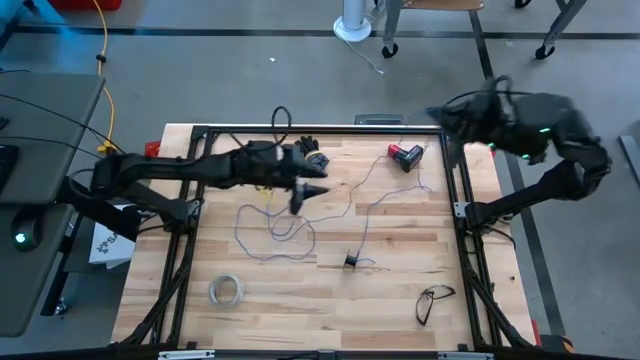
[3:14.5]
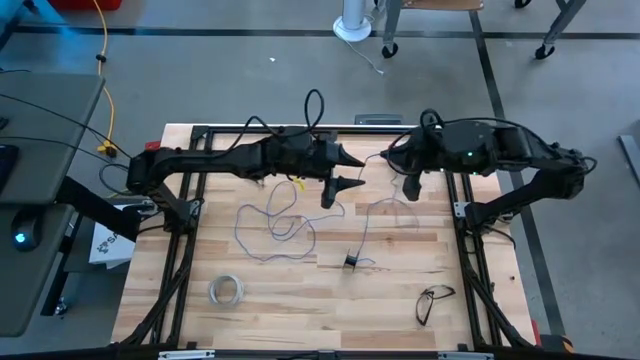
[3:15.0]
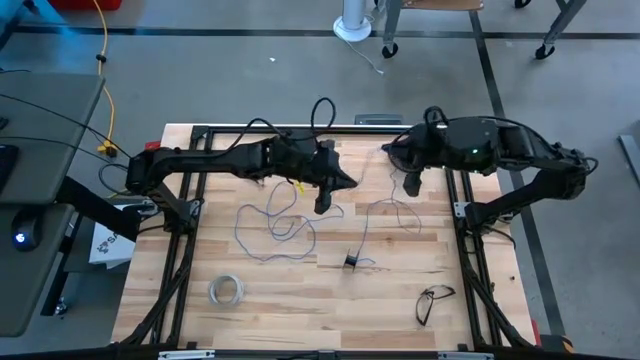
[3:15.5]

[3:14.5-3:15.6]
Task: Coil cords
Uncoil the blue wire from the black spool

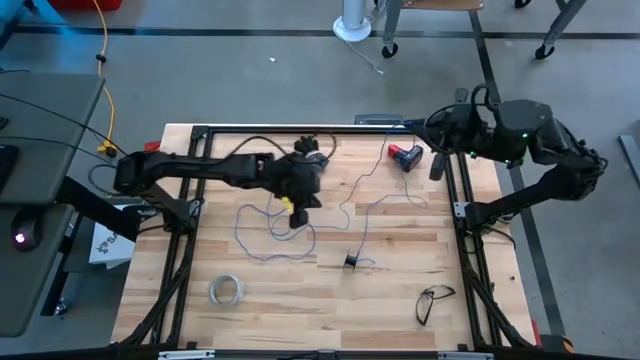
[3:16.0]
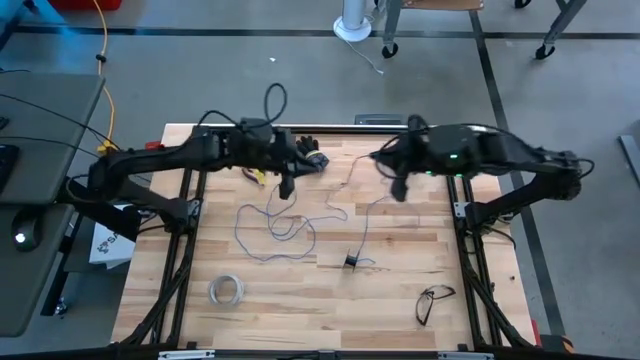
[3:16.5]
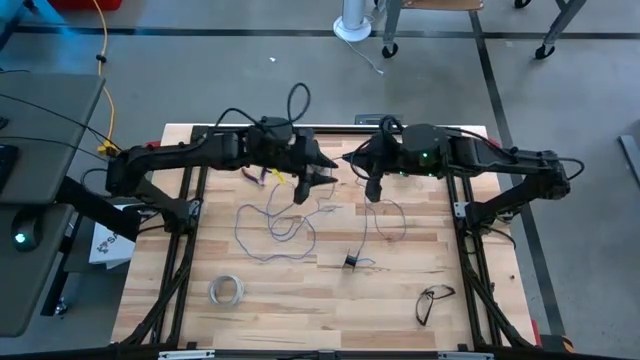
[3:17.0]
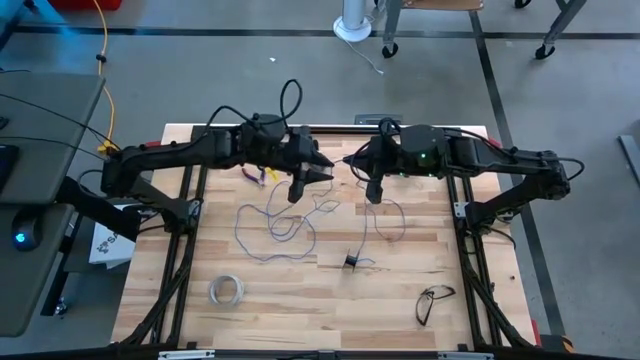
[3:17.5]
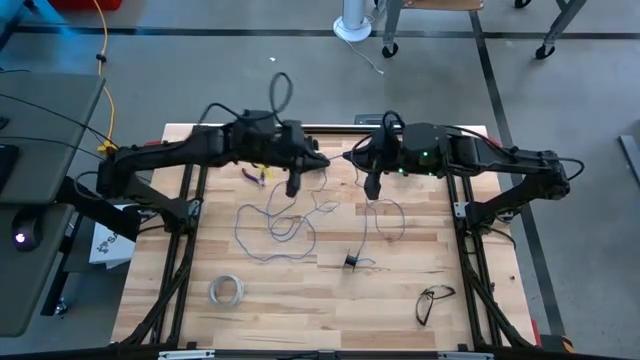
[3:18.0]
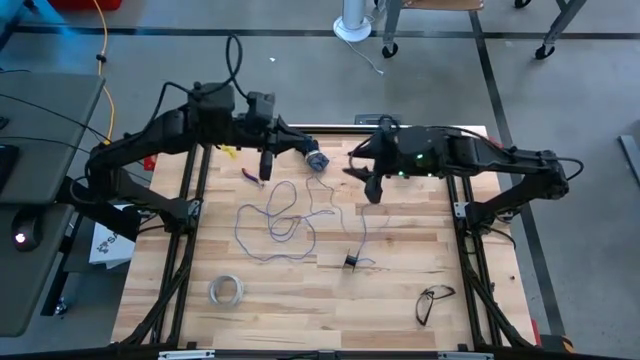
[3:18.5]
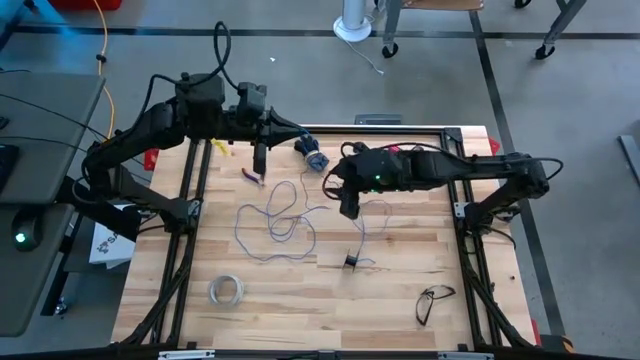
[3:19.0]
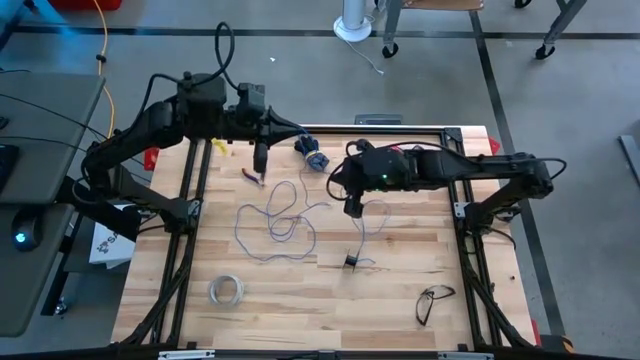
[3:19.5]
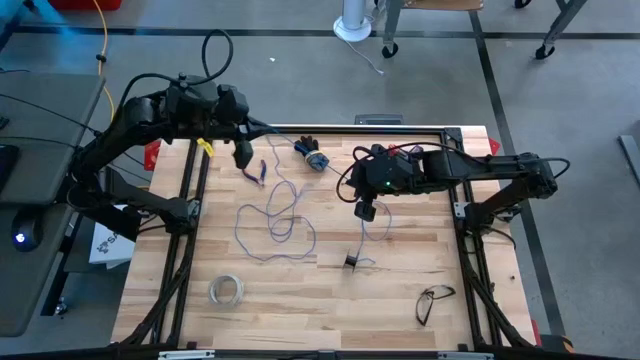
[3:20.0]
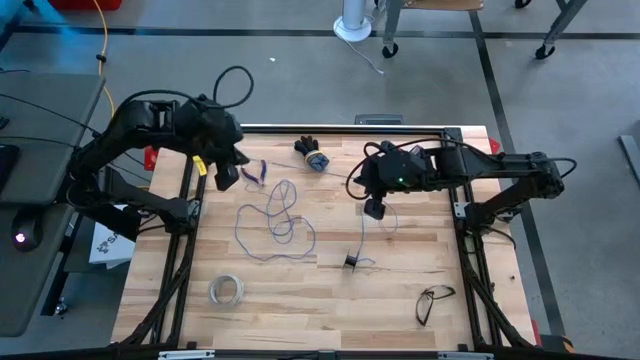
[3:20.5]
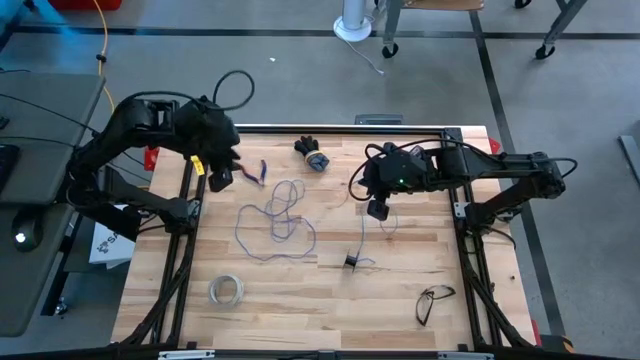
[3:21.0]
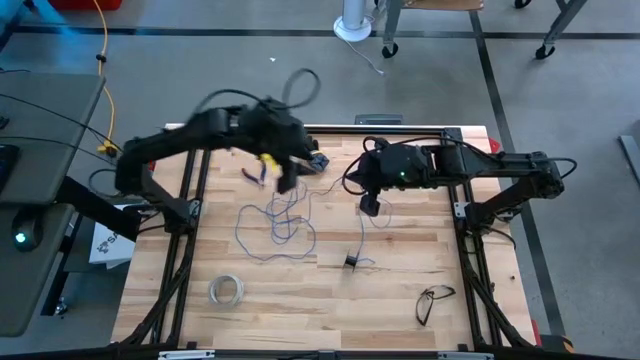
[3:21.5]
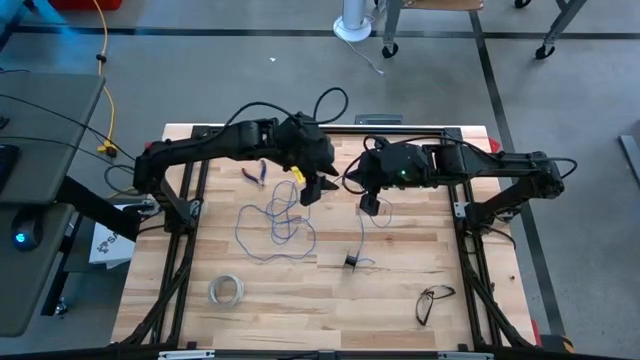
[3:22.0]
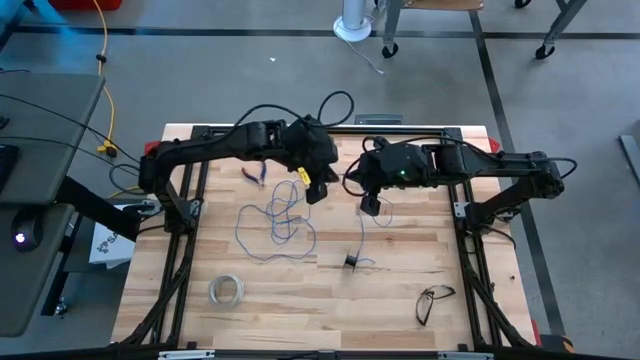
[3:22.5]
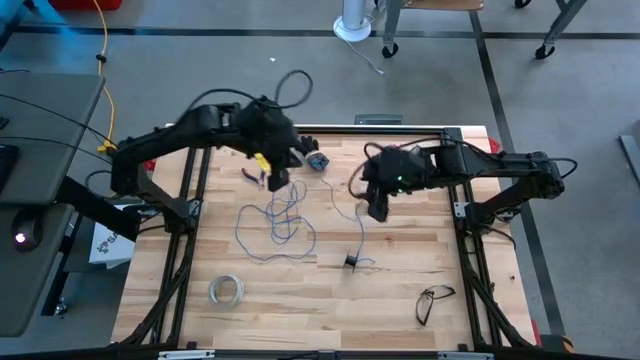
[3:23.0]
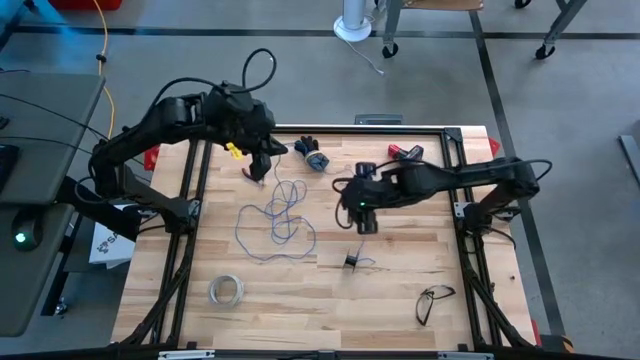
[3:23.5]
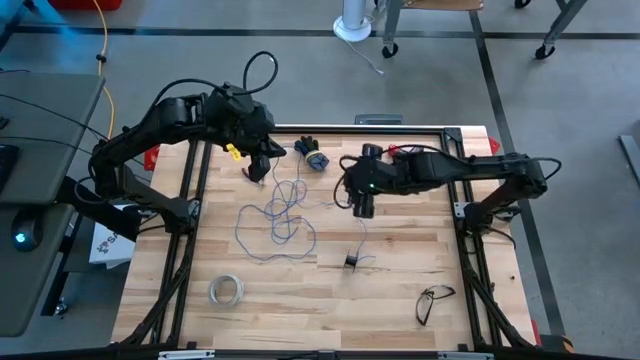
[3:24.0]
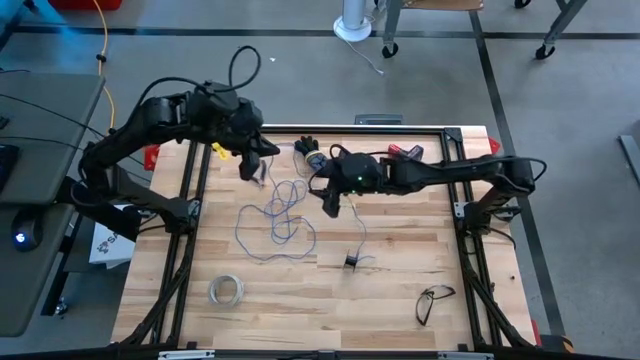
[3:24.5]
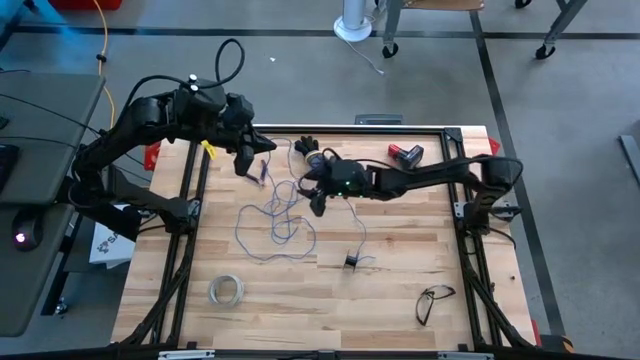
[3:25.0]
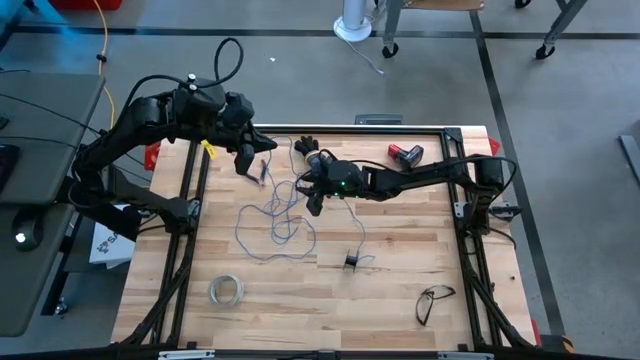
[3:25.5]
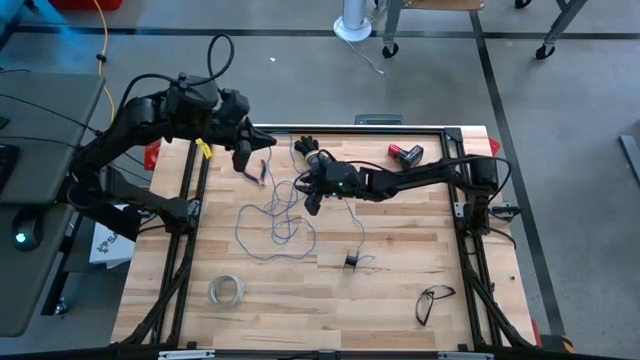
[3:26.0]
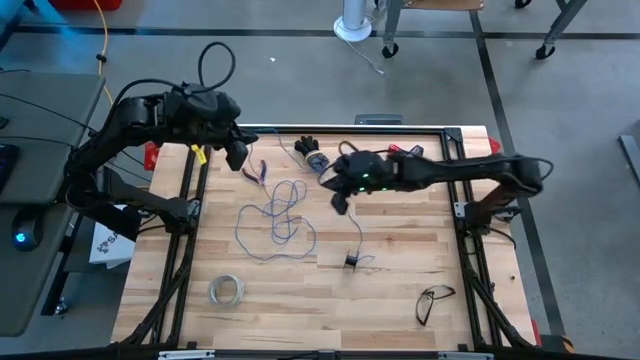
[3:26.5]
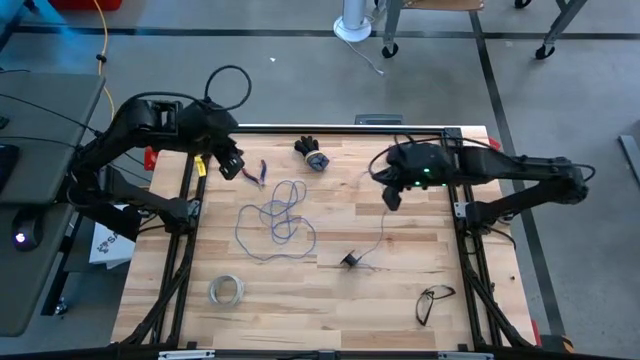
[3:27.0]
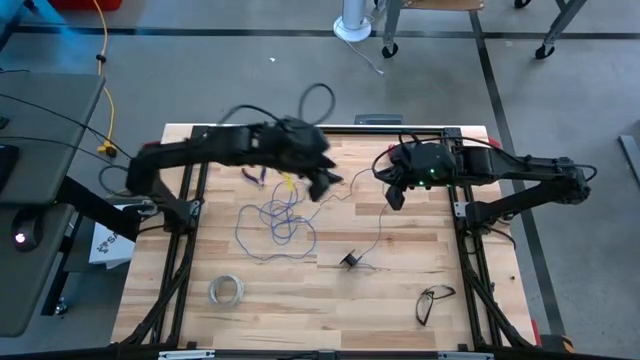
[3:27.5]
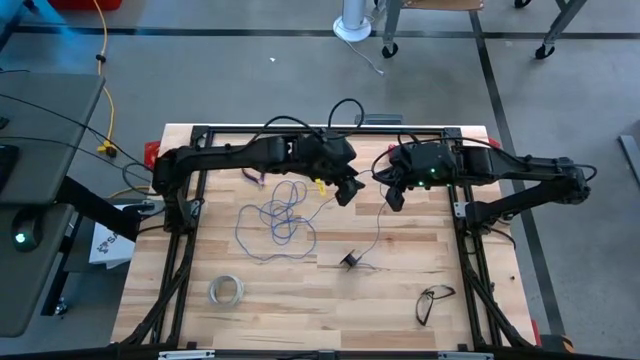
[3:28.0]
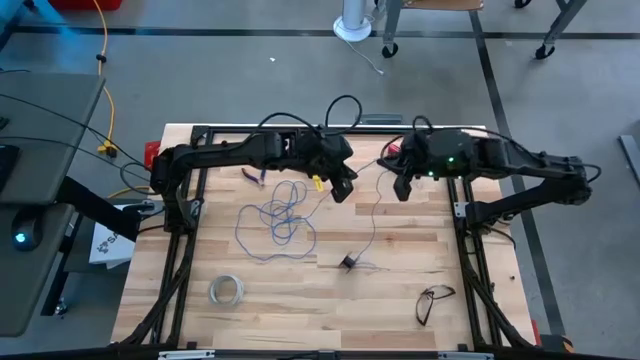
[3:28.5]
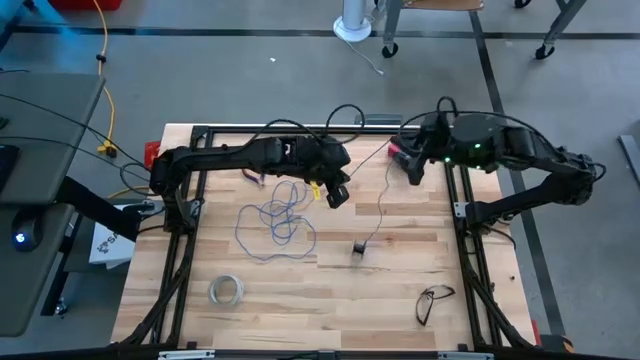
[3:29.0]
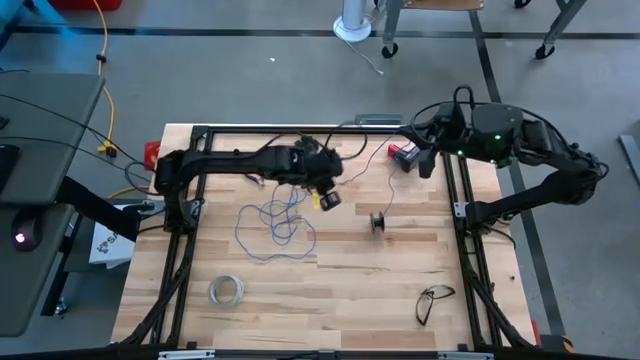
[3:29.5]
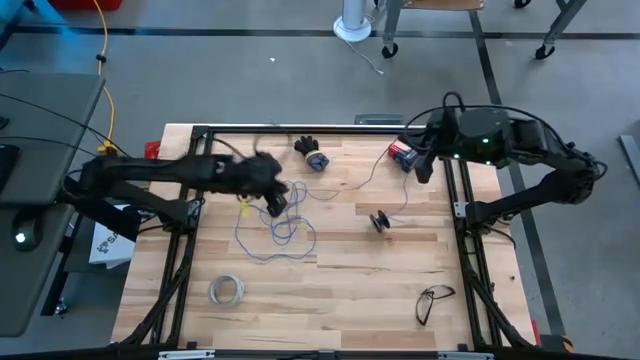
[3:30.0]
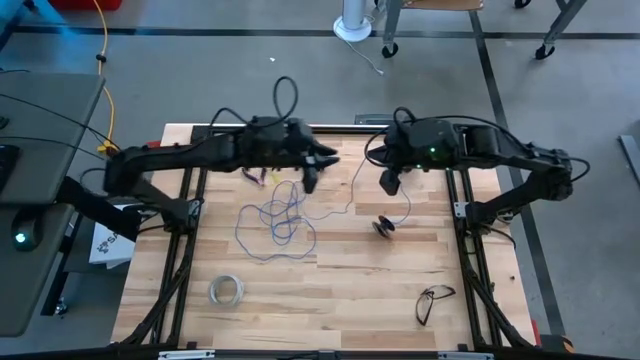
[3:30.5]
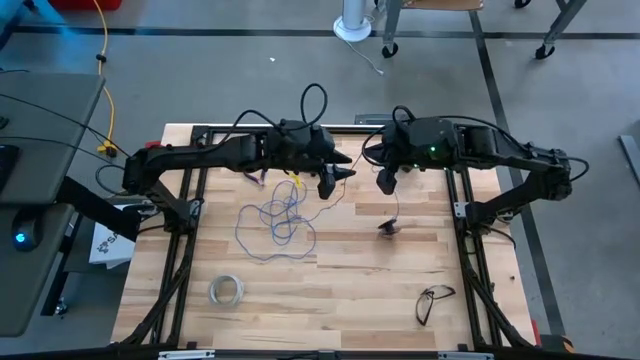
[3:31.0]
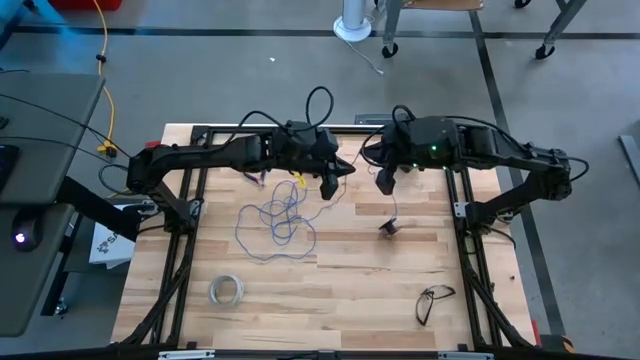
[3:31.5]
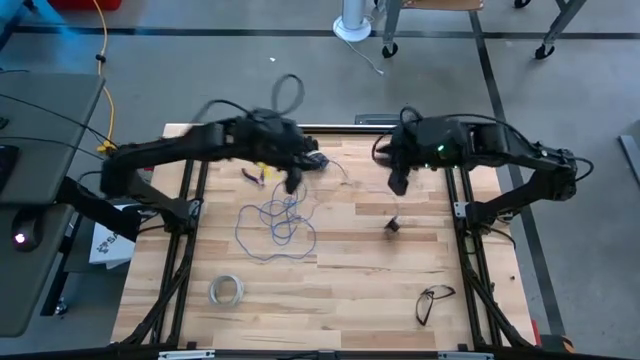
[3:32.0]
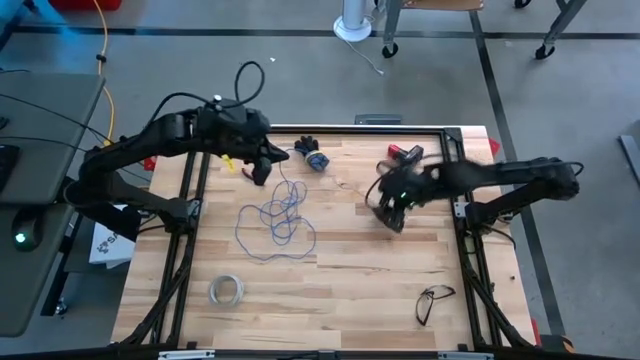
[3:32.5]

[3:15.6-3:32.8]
Uncoil the blue wire from the black spool

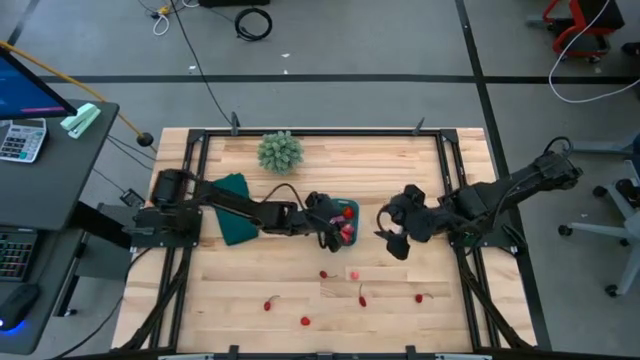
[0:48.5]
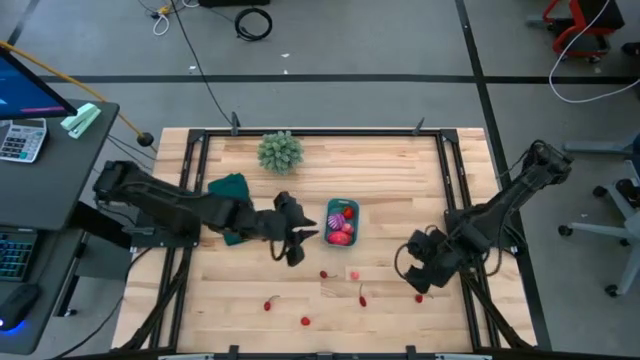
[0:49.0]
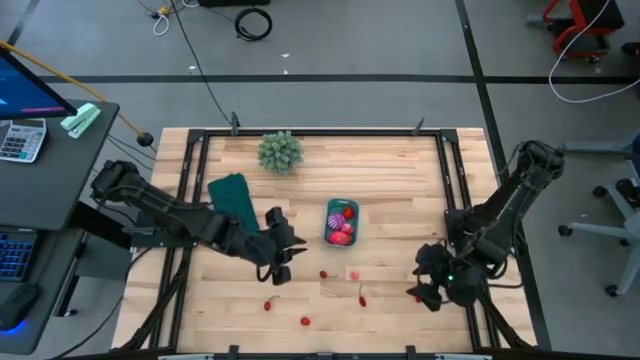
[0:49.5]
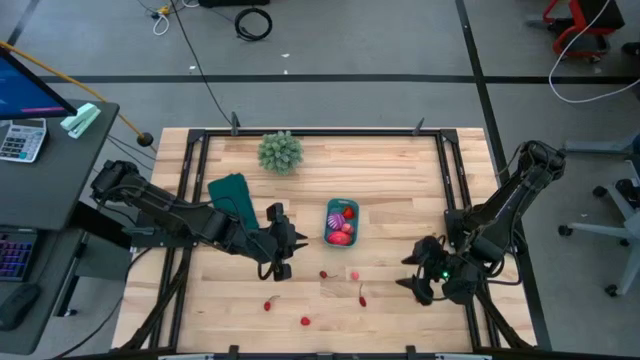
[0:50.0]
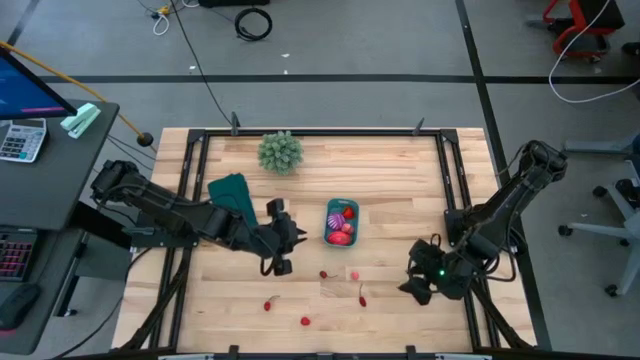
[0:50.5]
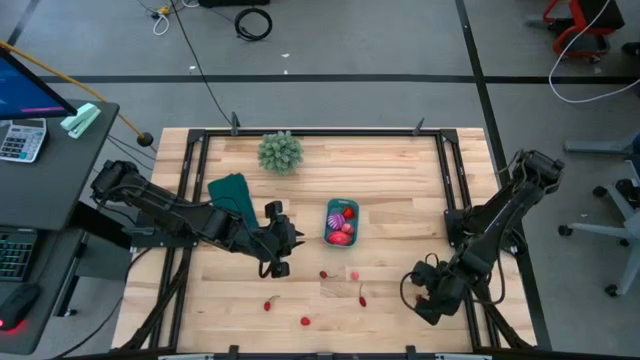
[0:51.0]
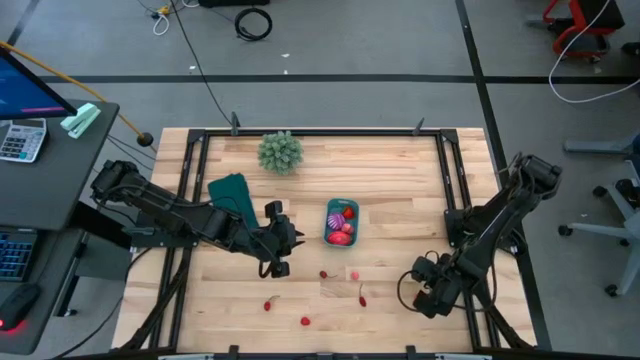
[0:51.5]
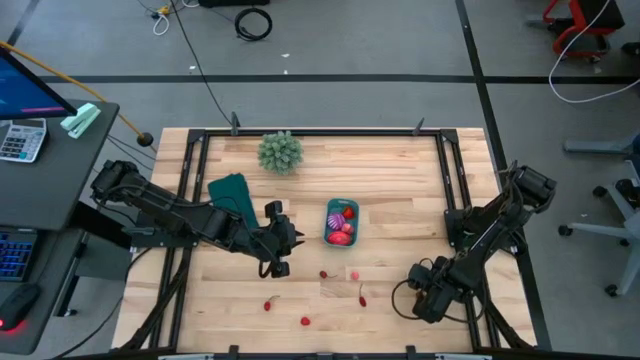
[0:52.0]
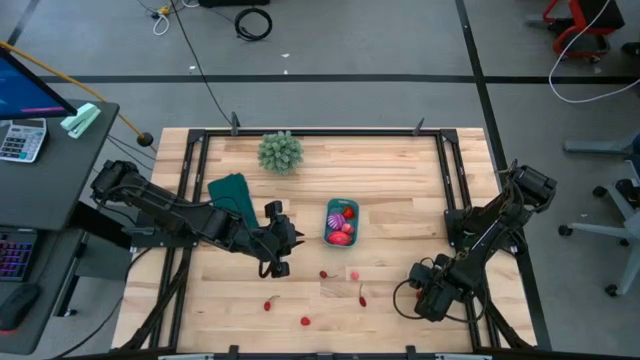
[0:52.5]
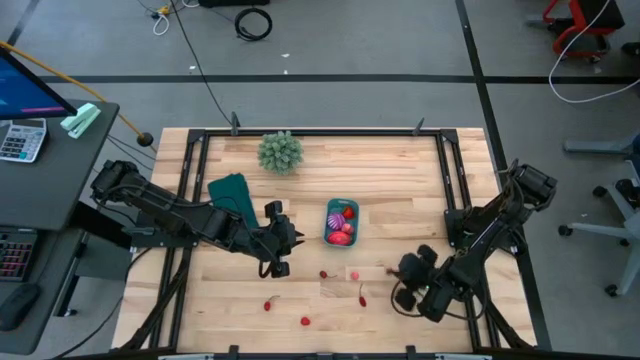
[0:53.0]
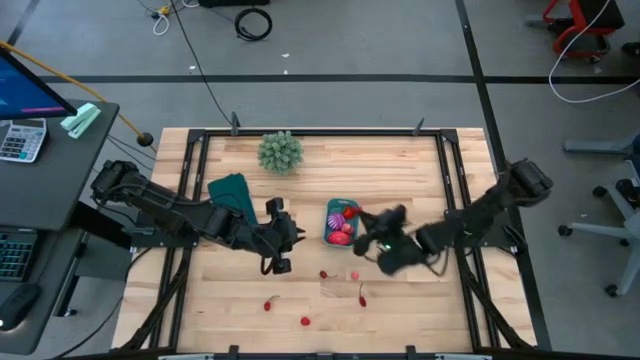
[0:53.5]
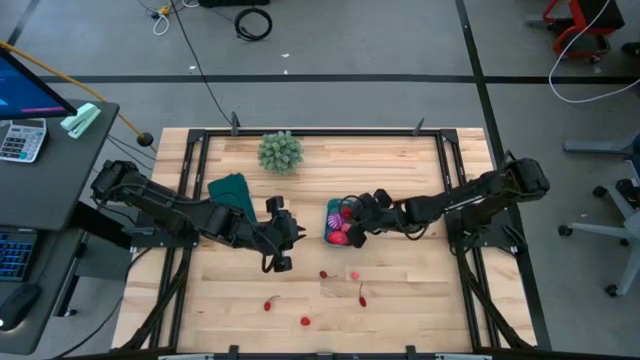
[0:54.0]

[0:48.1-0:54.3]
Task: Pick and placing Produce into tupperware
Put the red cherry into the blue bin
